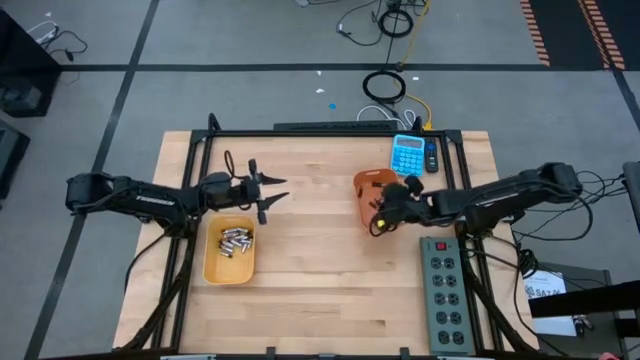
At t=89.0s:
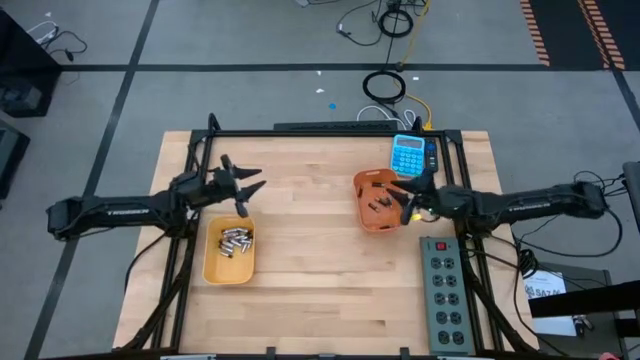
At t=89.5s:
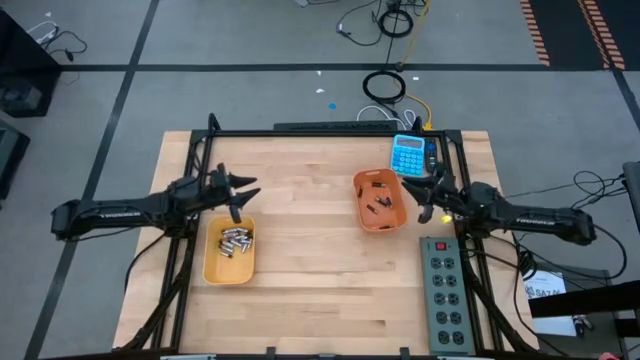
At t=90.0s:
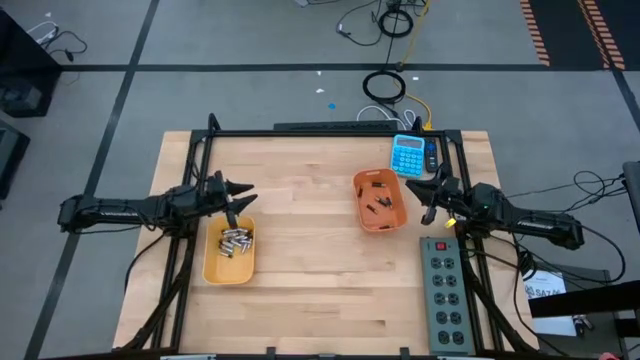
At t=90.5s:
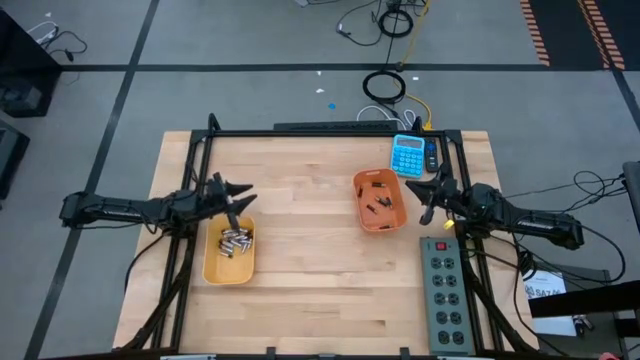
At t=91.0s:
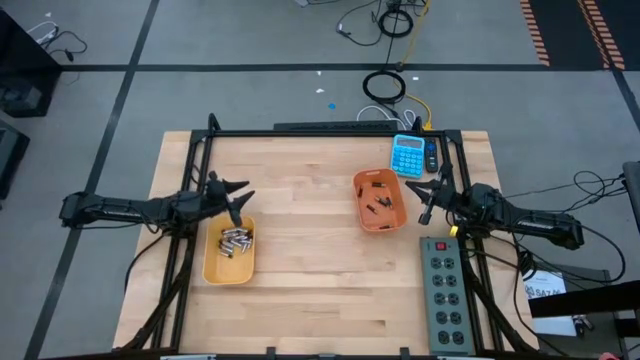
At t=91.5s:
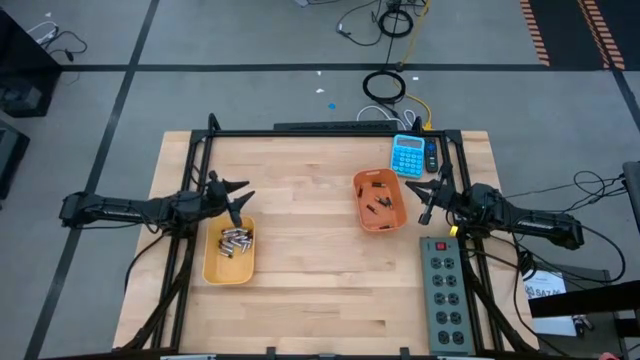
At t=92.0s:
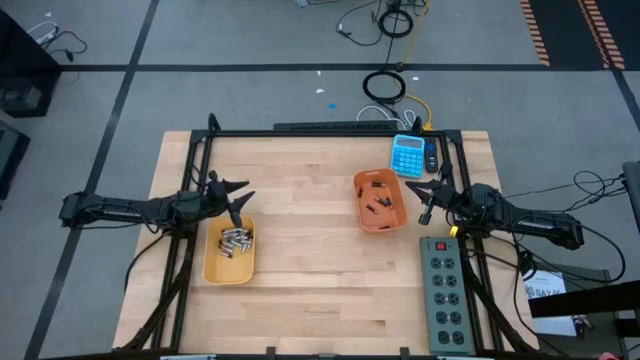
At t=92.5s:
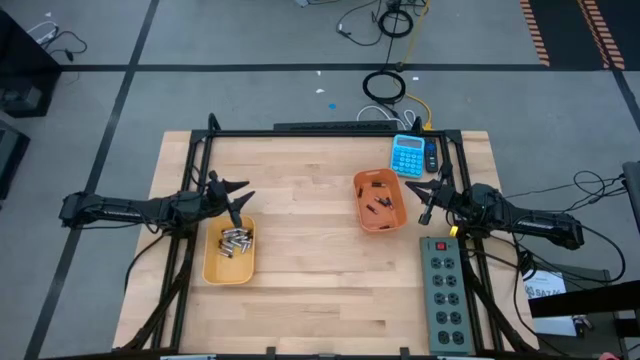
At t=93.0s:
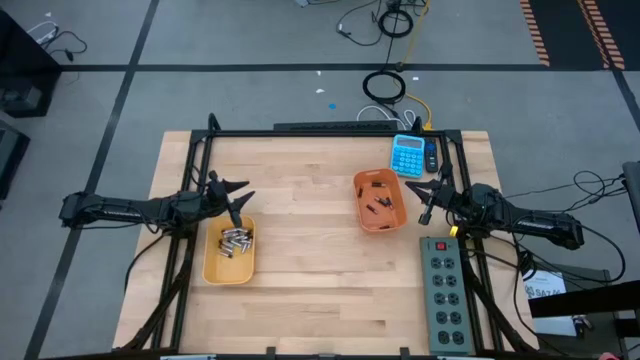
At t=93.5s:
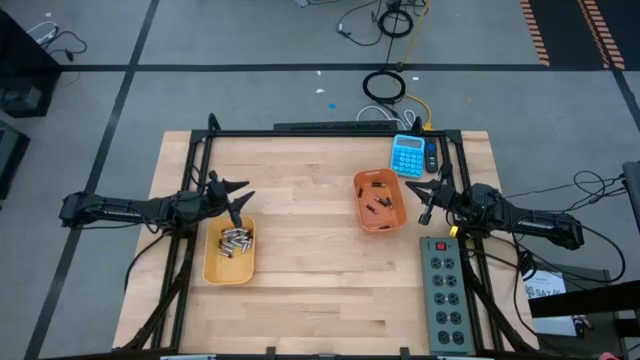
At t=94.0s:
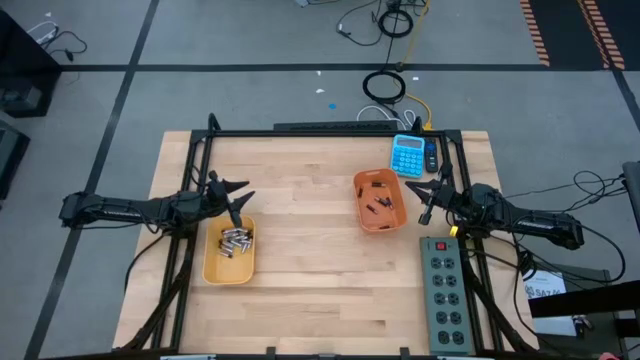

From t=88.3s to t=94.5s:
Task: Sort batteries
Return to Home Position

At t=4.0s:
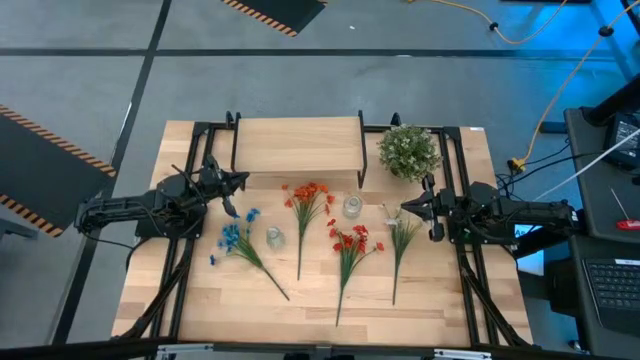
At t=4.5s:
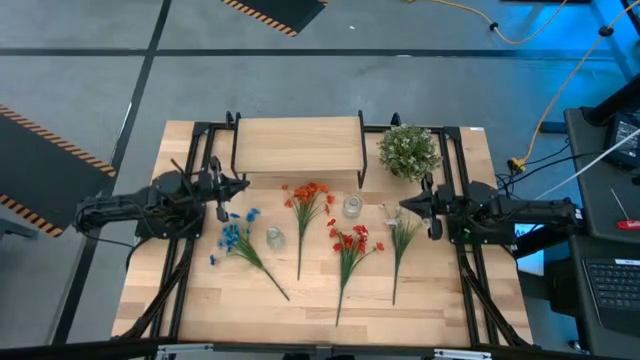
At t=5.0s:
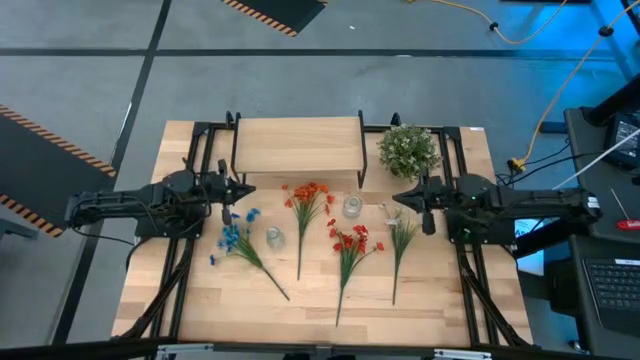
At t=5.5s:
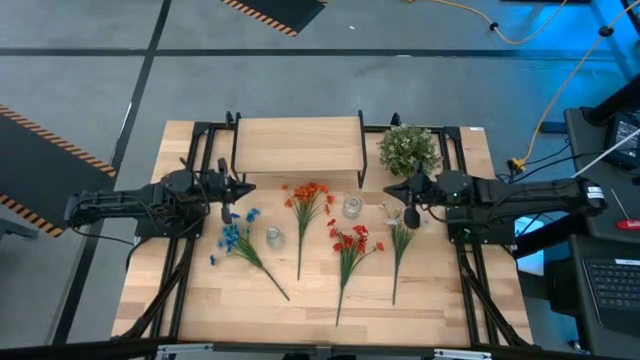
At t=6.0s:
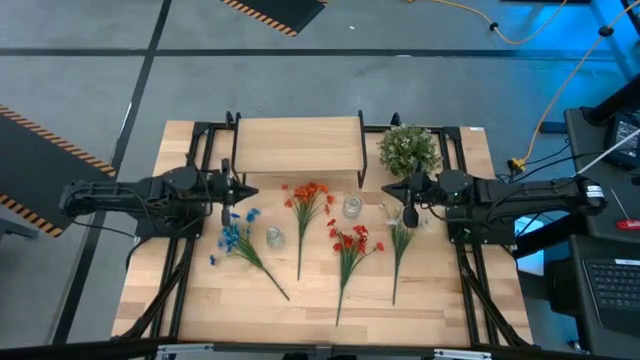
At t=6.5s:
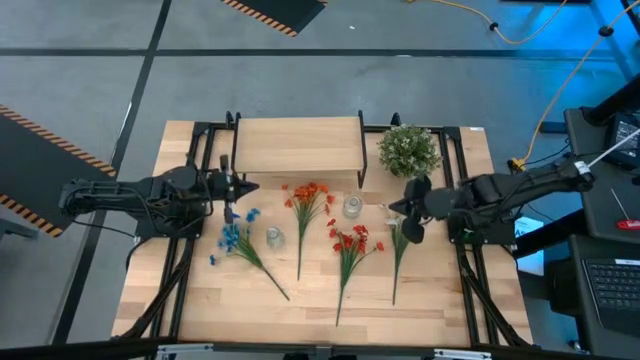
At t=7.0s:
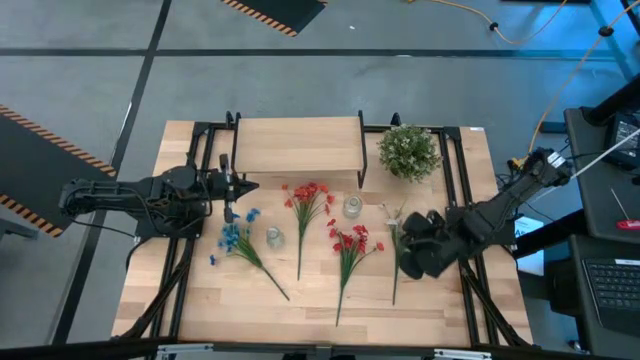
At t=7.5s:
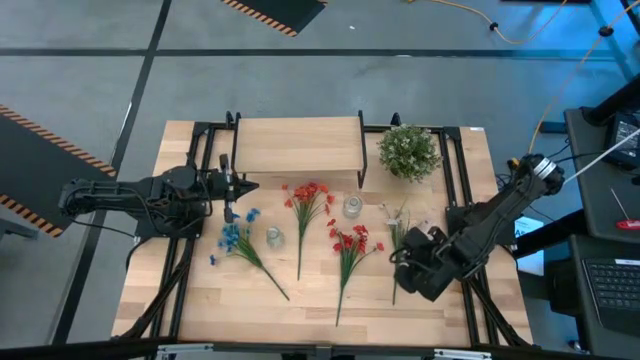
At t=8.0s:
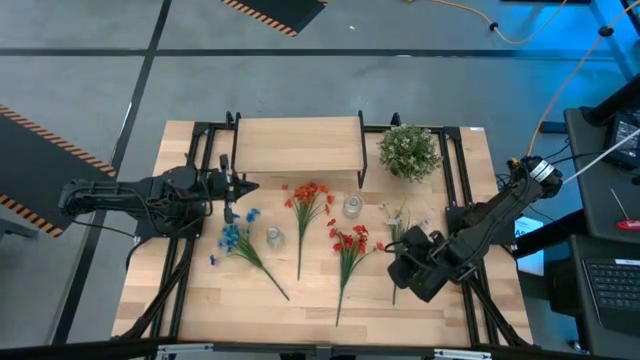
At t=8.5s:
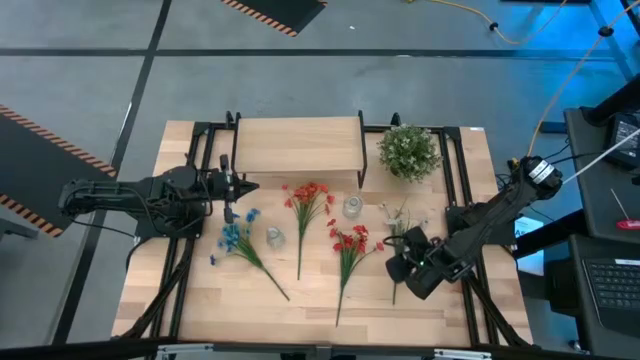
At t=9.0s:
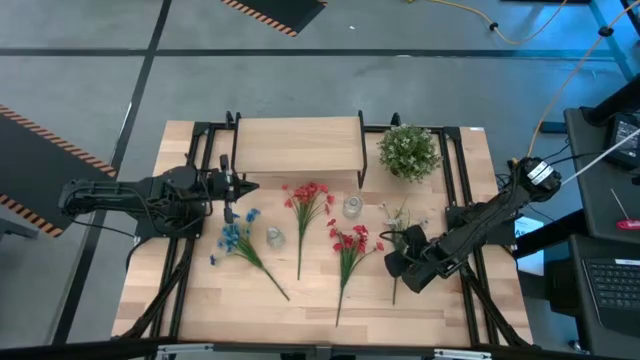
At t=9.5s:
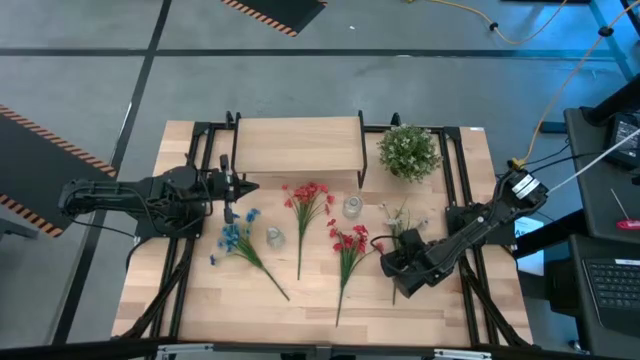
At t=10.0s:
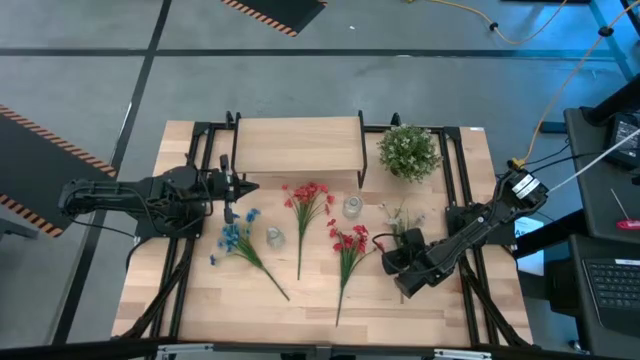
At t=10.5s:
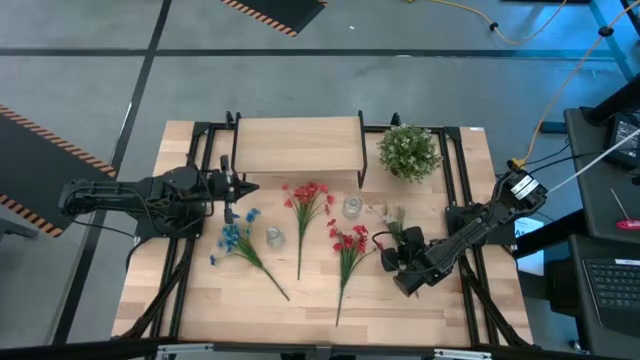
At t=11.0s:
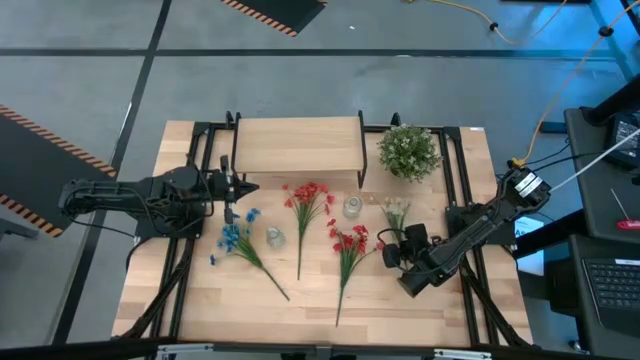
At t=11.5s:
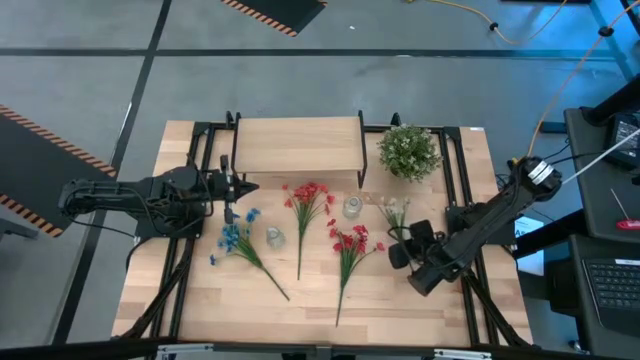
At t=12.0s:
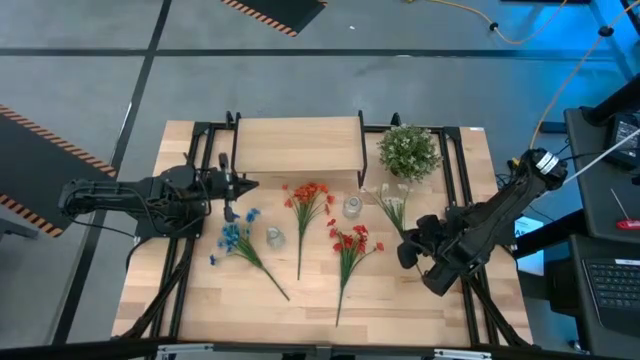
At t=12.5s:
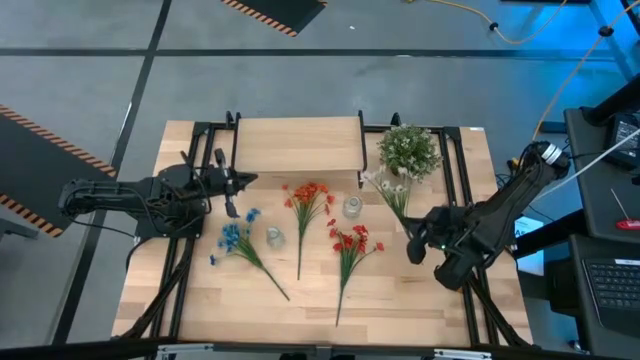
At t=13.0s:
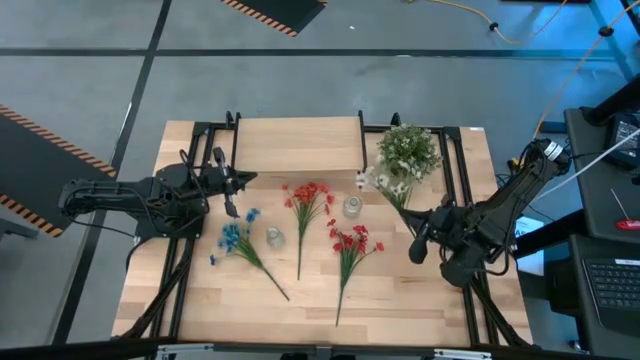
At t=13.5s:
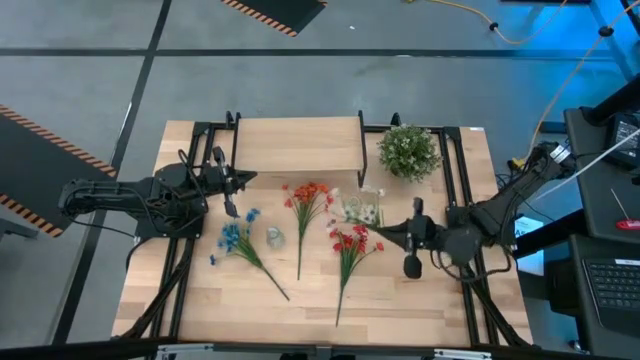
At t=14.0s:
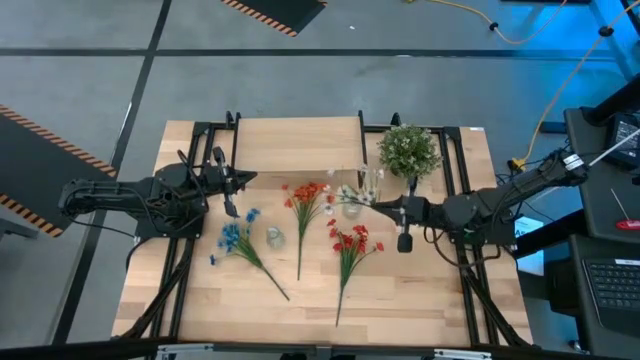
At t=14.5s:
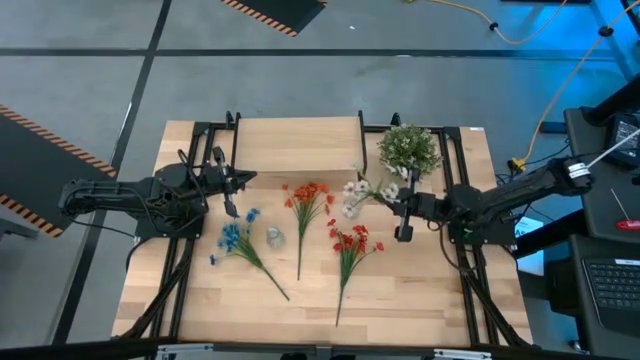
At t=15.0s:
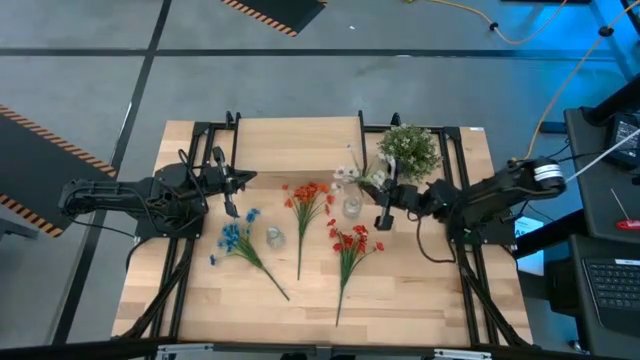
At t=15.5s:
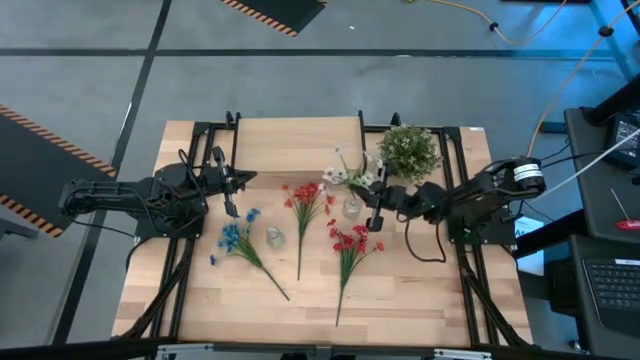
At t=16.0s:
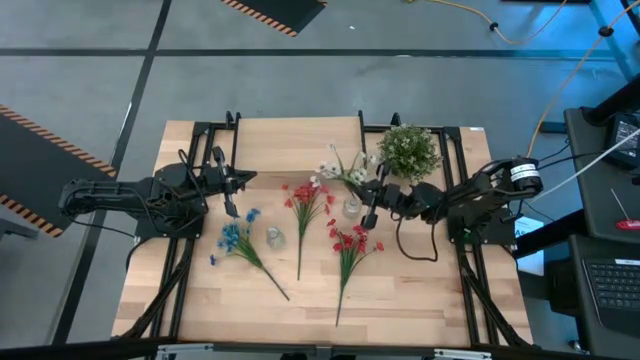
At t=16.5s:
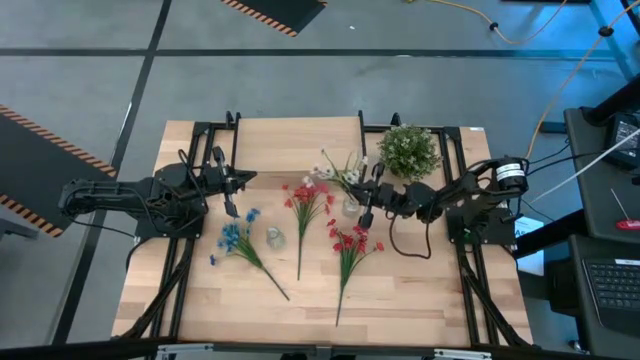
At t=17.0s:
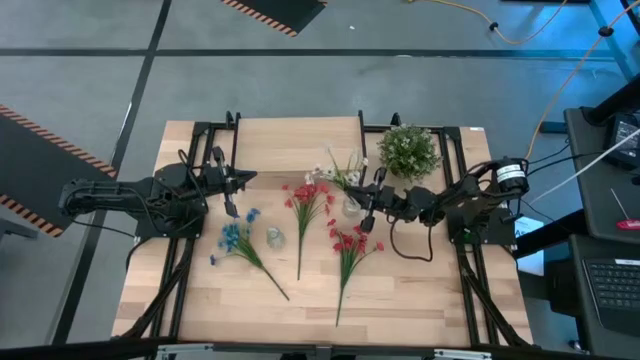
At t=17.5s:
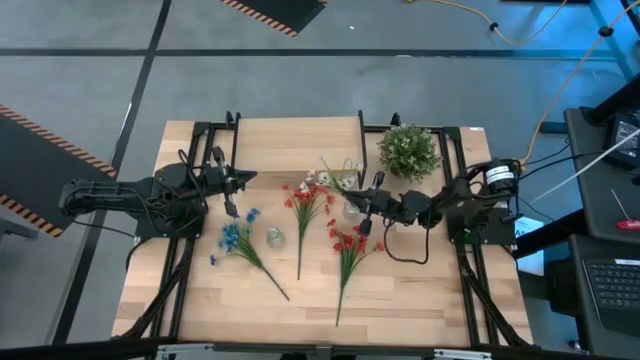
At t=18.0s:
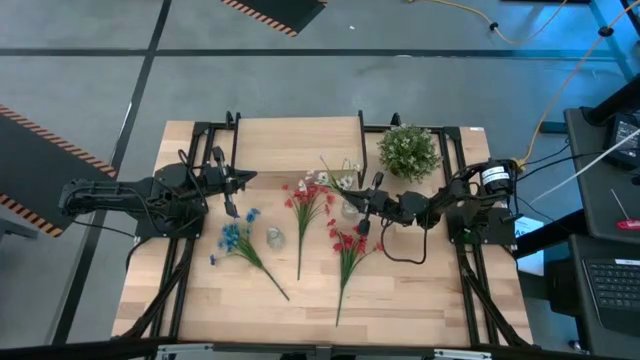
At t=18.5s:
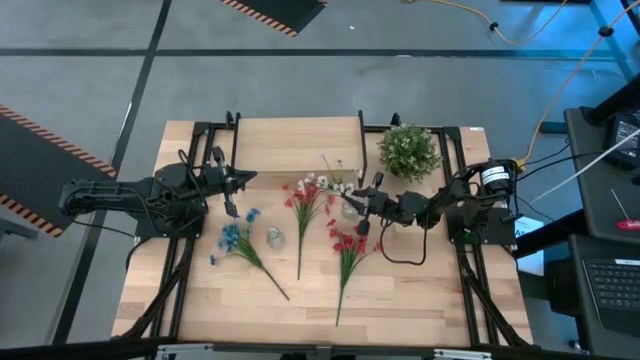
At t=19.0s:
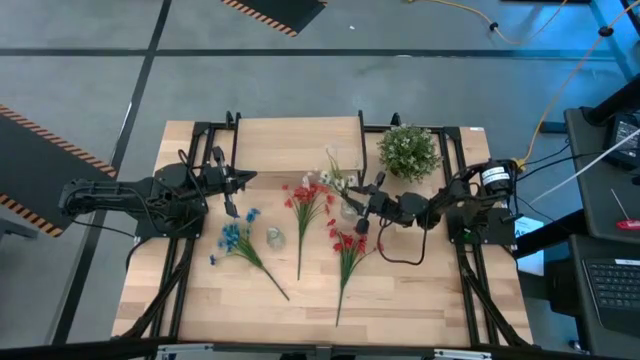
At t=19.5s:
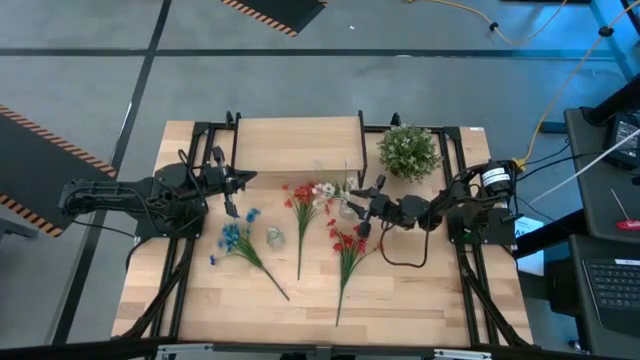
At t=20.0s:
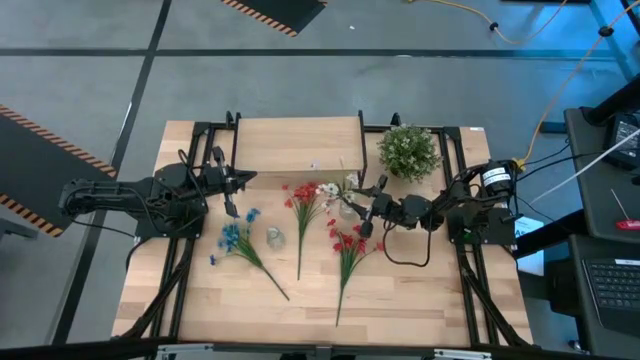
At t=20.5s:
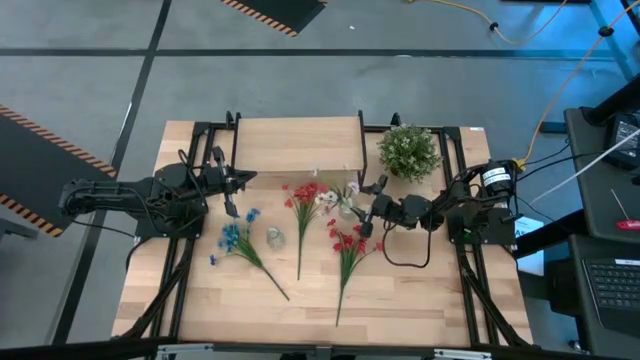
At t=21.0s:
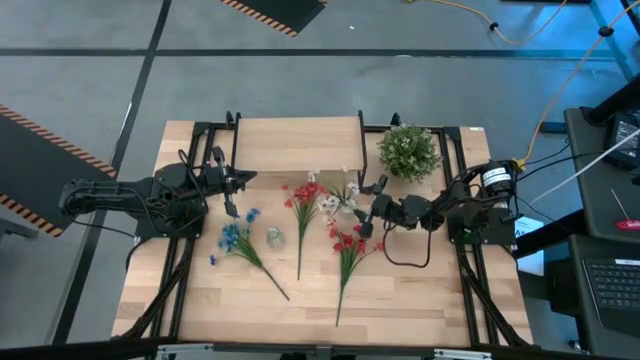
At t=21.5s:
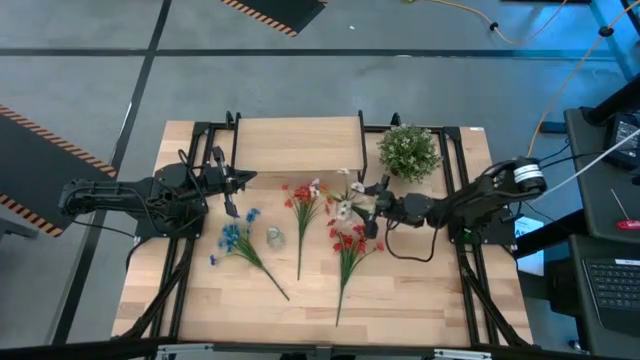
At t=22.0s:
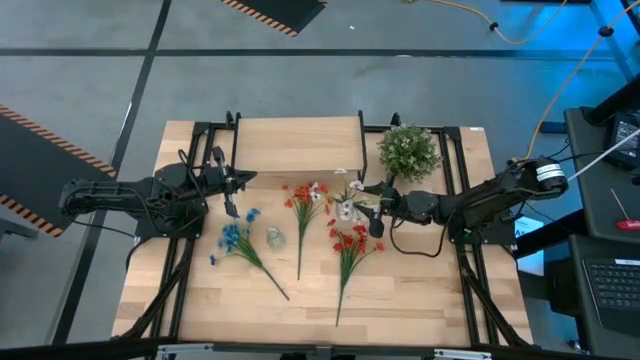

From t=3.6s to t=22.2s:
Task: Pick and place flowers into a vace then onto a shelf
Put the white flowers into the right transparent vase
